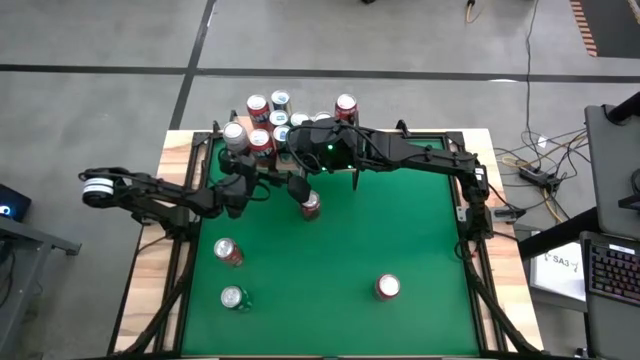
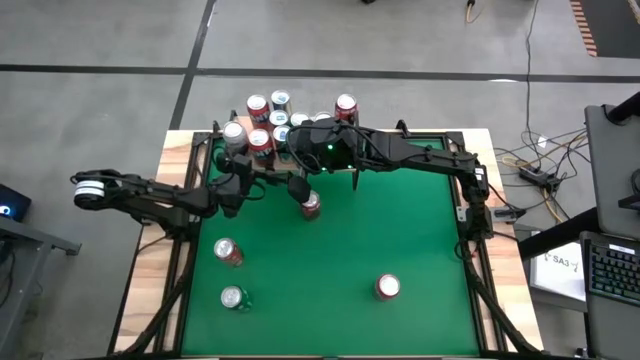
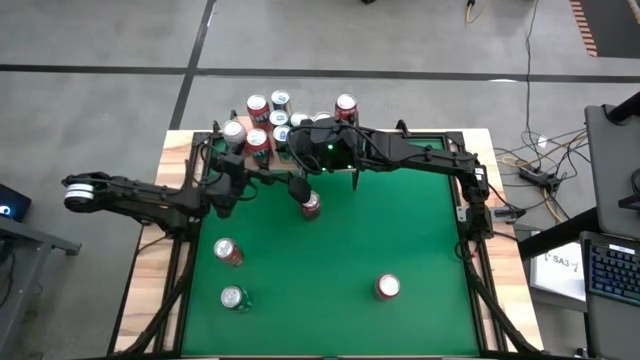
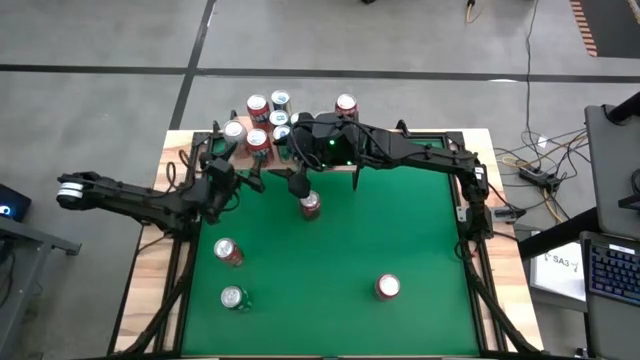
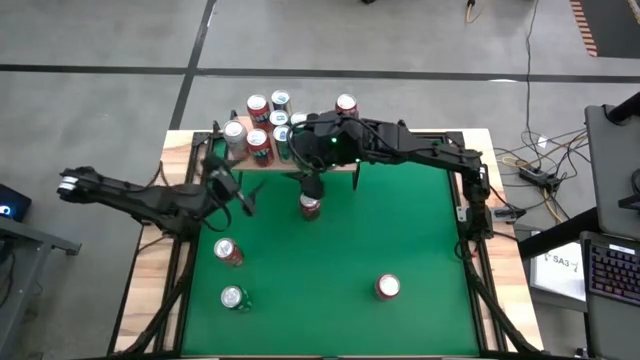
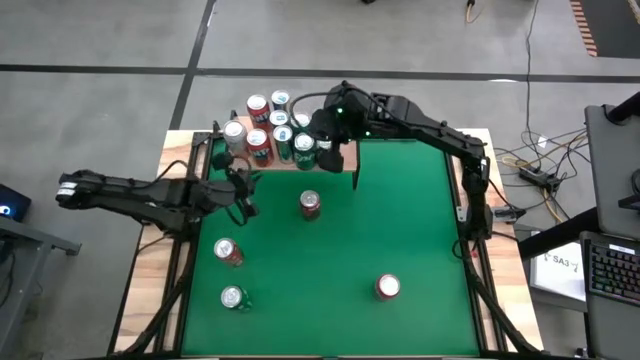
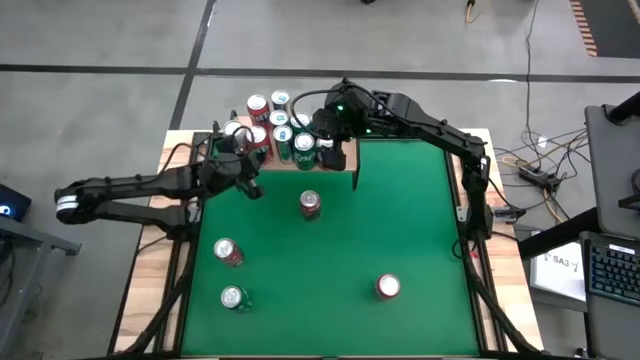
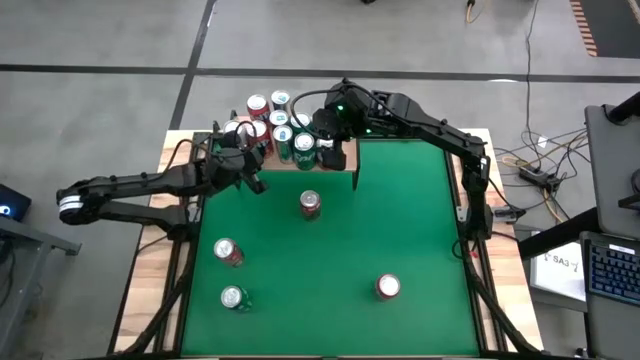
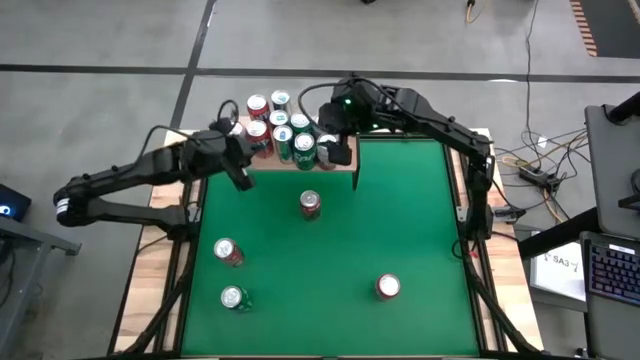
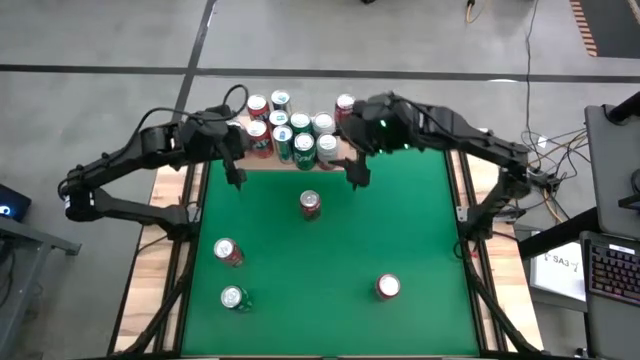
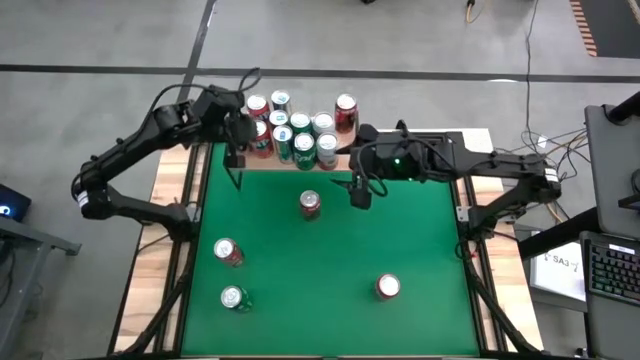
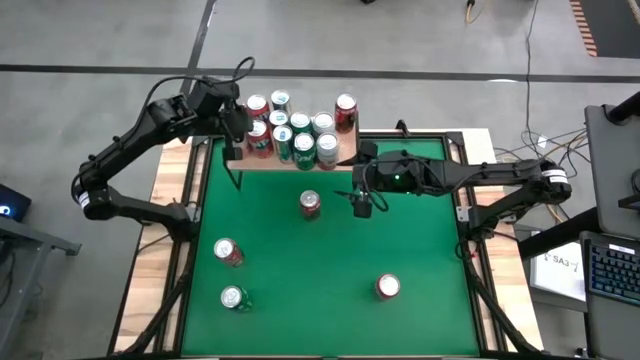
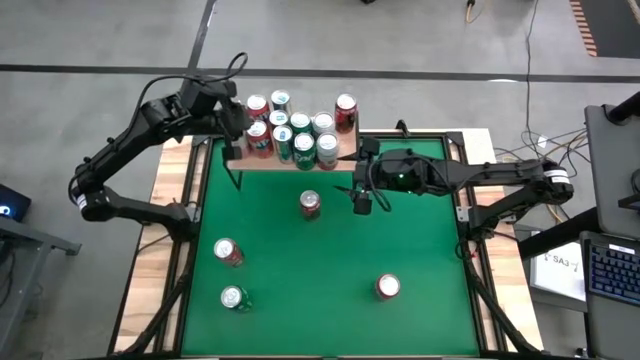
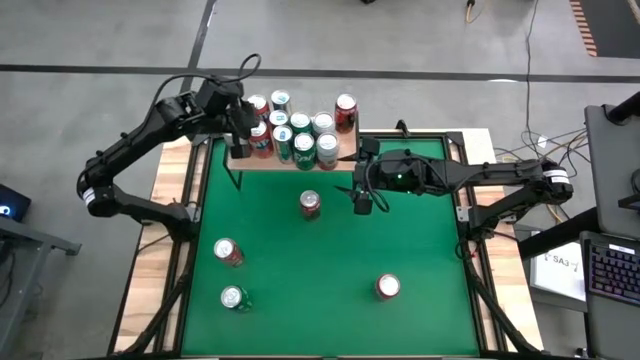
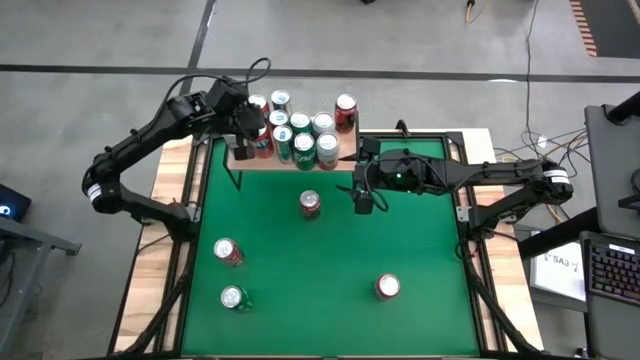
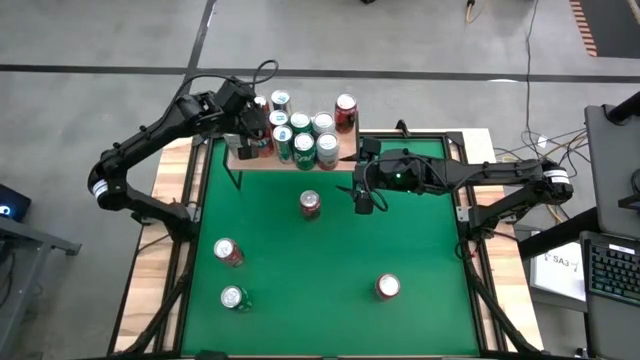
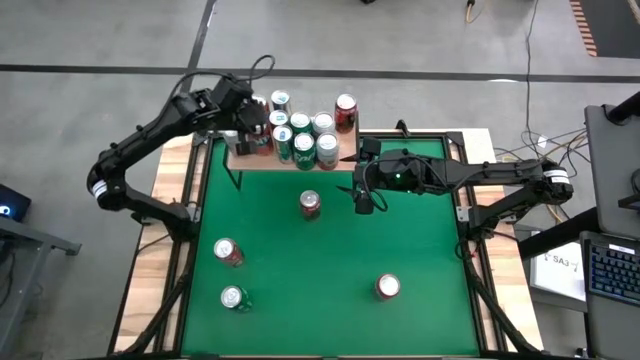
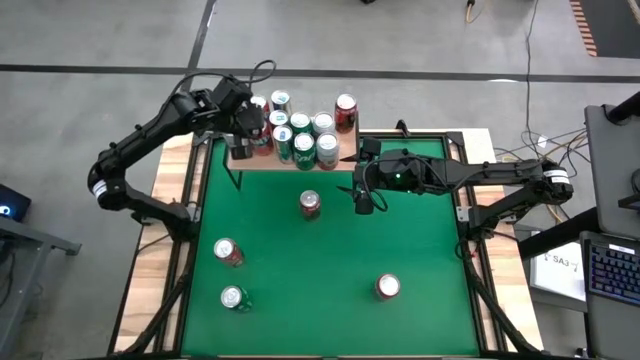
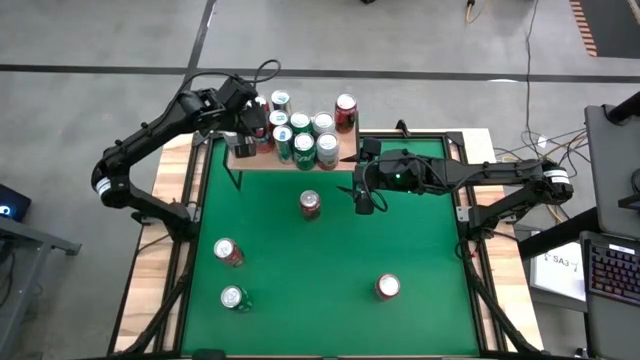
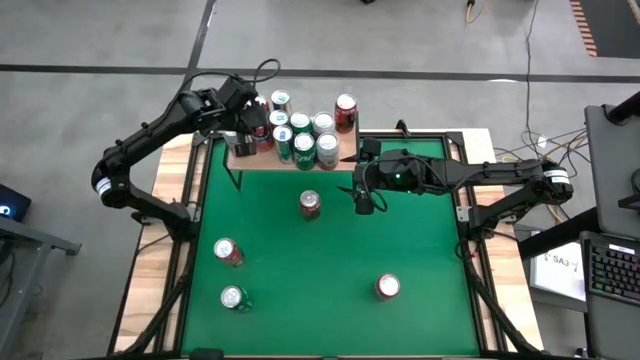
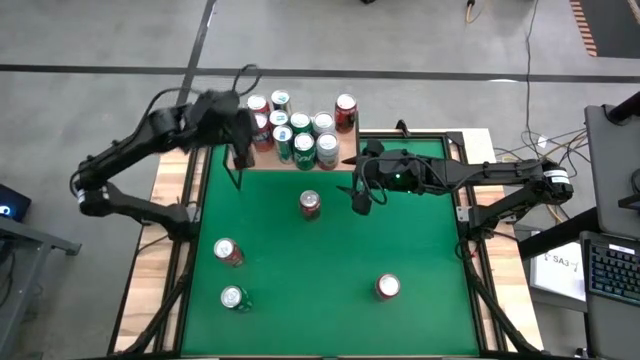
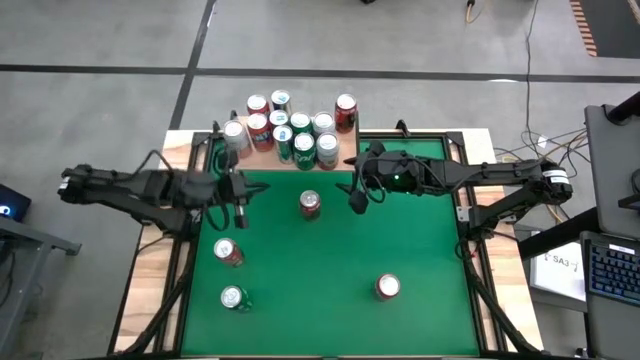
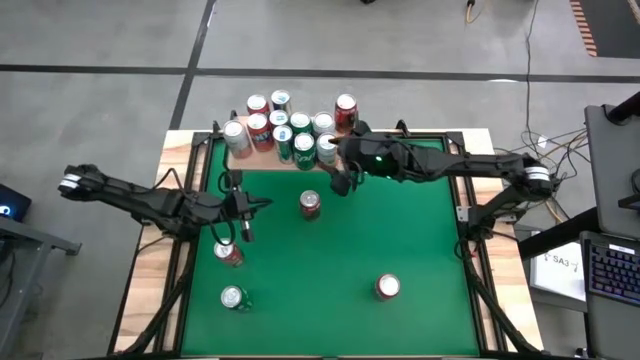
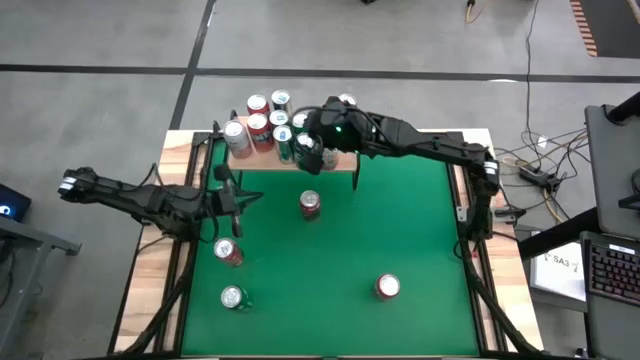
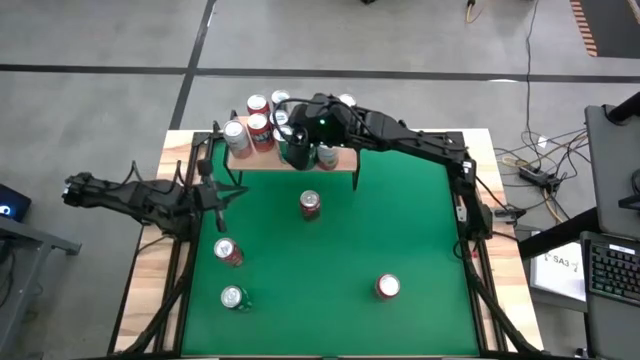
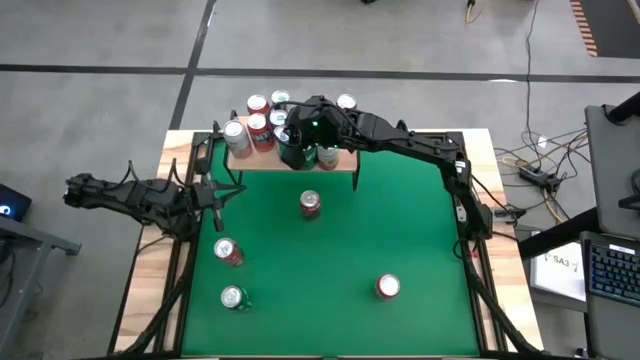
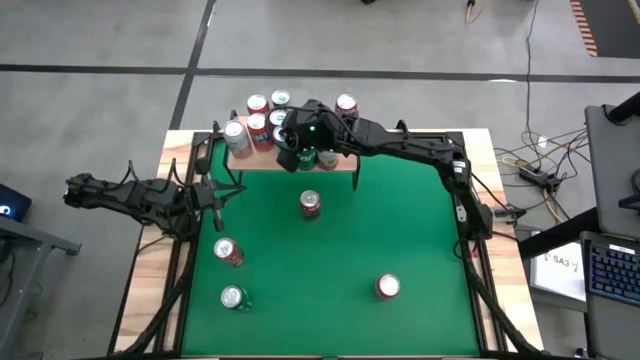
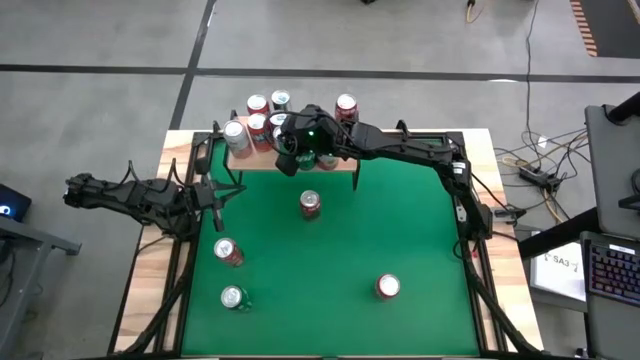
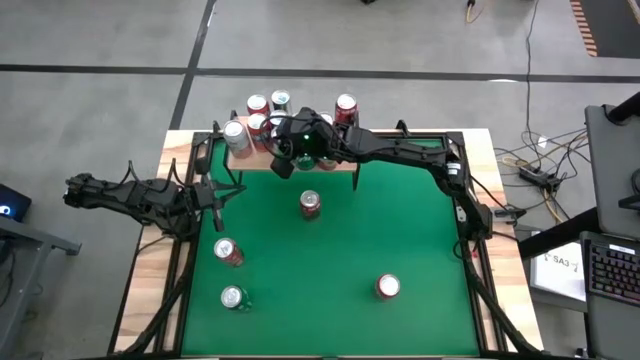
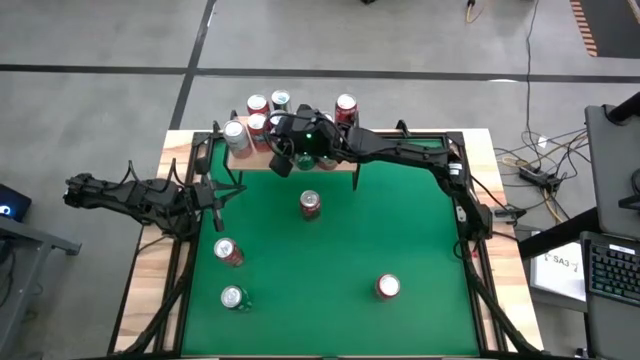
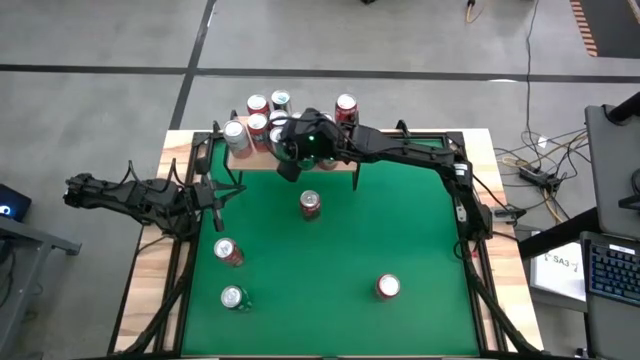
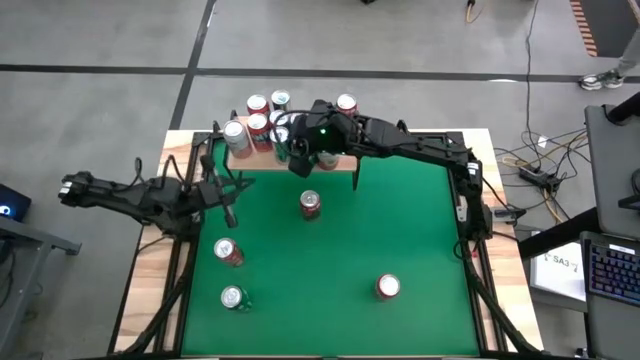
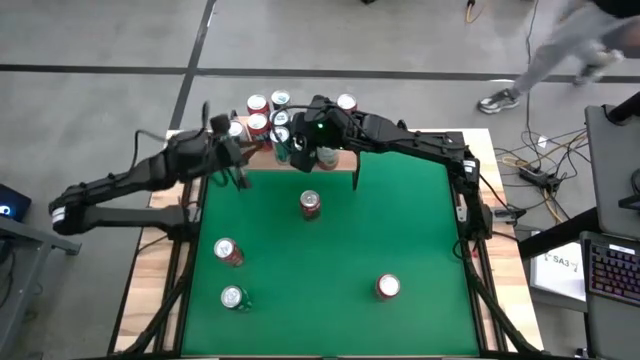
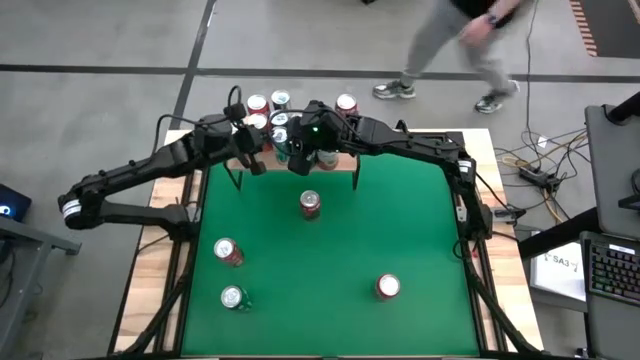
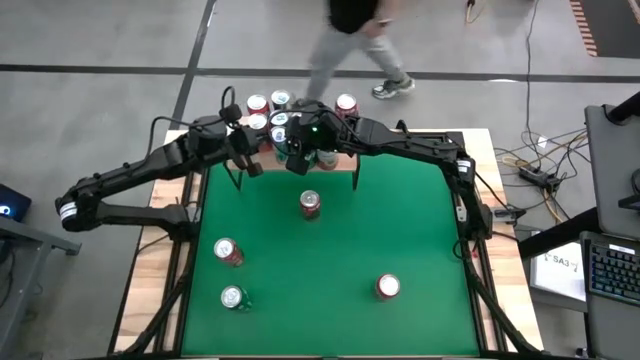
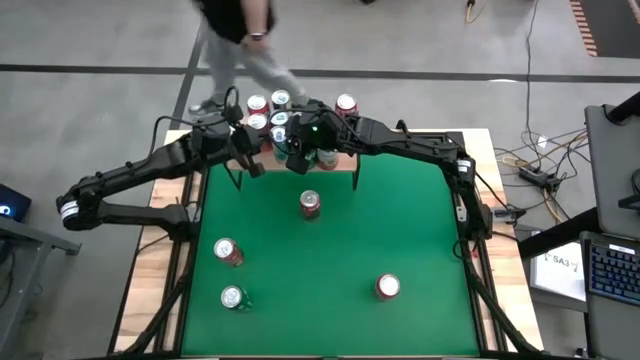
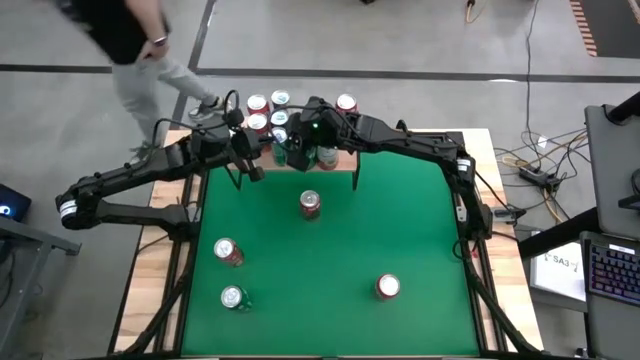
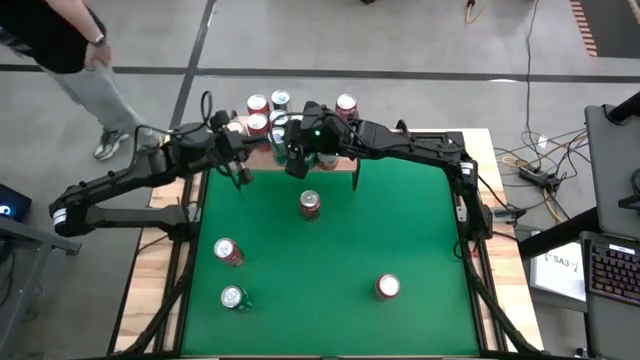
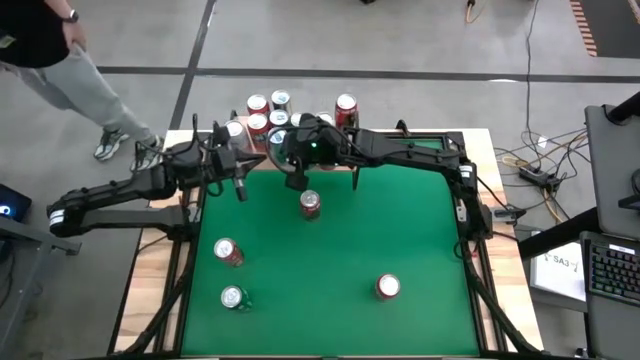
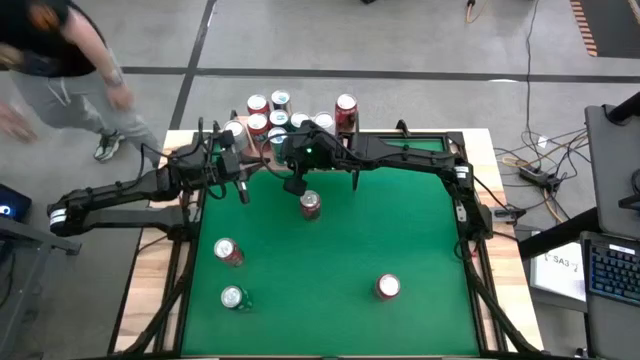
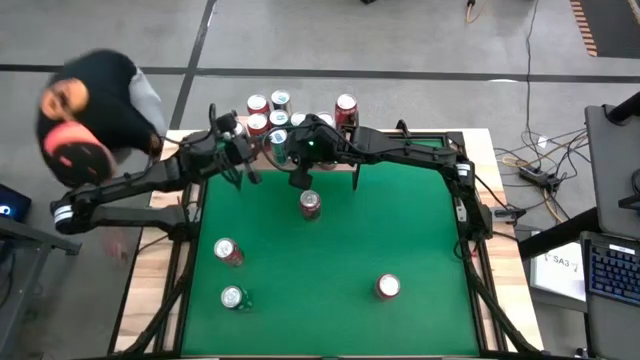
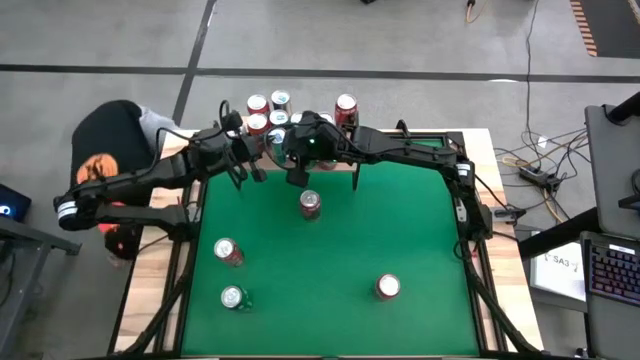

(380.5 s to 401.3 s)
Task: Place canned beverage on shelf
Put the red can on the shelf
